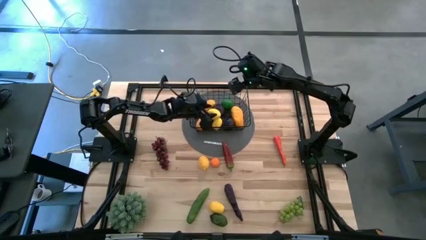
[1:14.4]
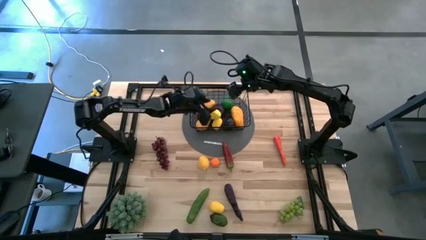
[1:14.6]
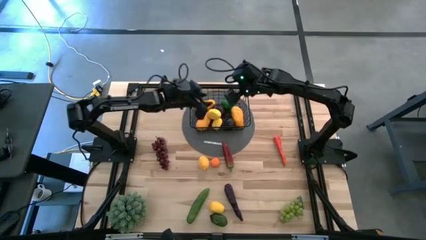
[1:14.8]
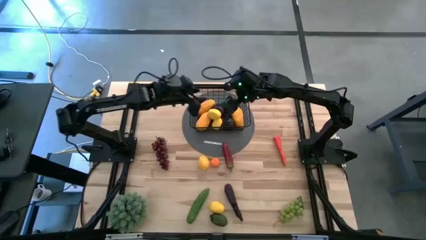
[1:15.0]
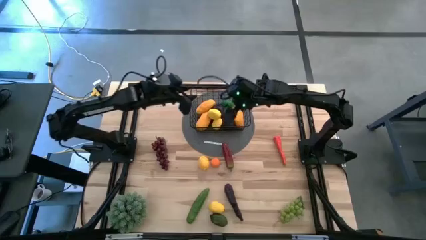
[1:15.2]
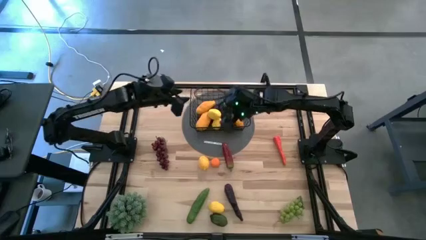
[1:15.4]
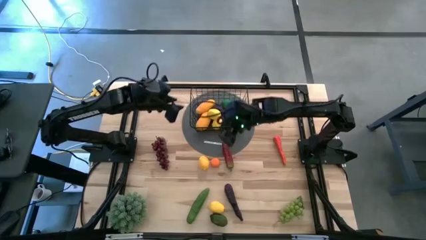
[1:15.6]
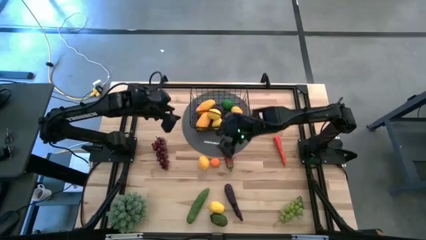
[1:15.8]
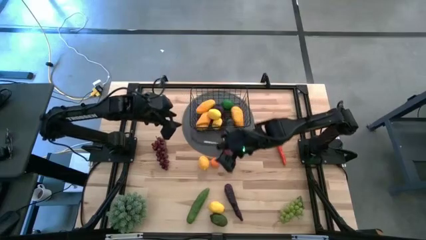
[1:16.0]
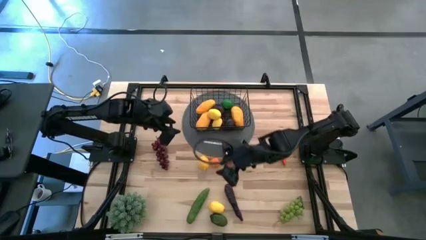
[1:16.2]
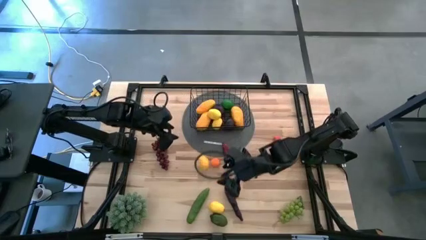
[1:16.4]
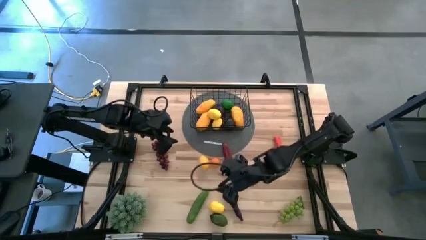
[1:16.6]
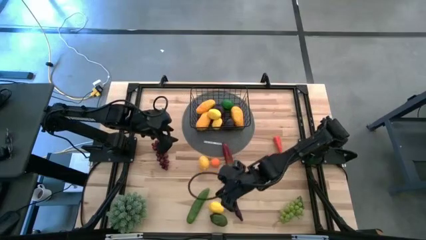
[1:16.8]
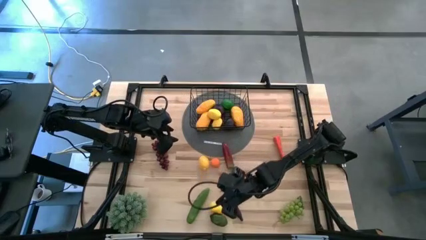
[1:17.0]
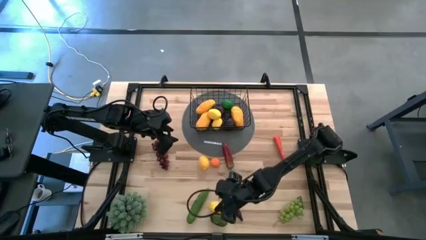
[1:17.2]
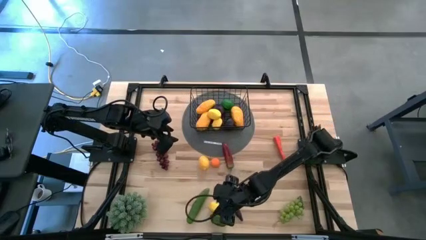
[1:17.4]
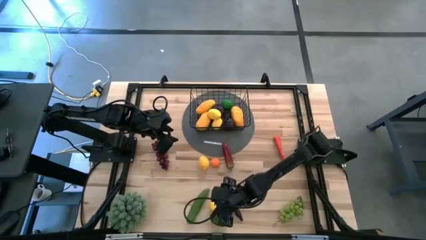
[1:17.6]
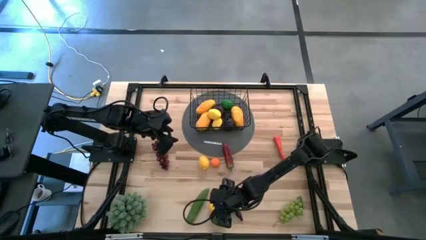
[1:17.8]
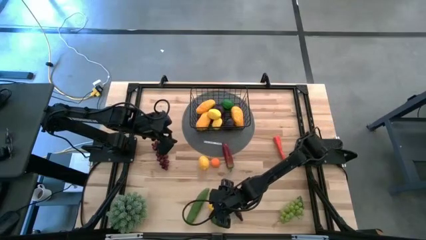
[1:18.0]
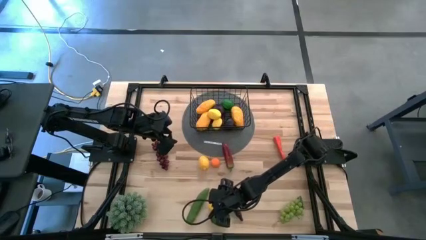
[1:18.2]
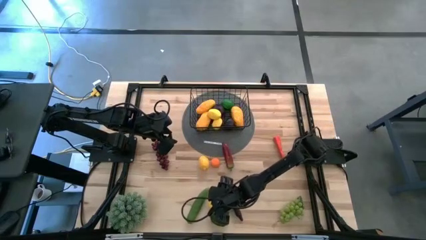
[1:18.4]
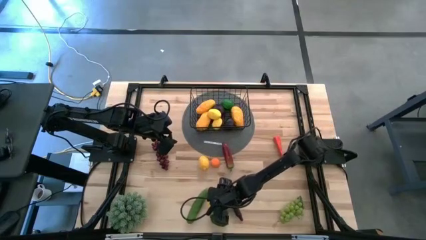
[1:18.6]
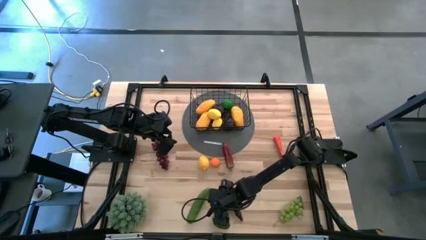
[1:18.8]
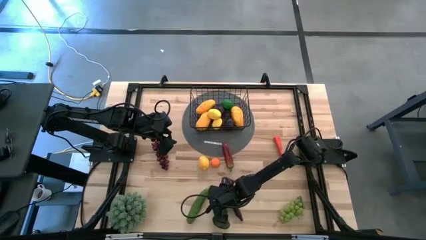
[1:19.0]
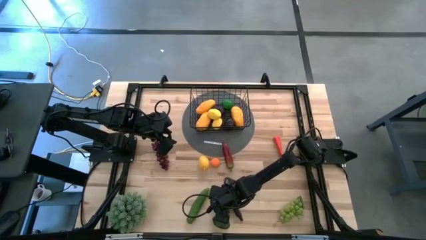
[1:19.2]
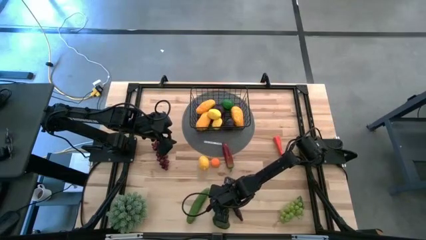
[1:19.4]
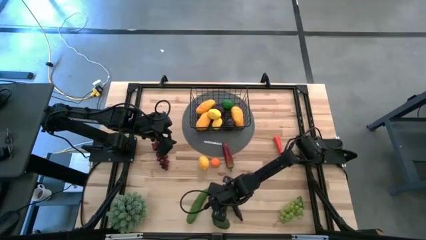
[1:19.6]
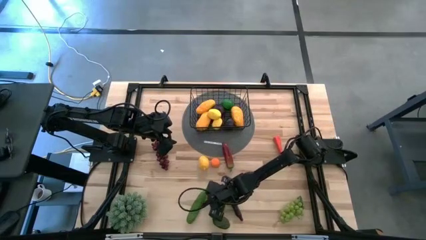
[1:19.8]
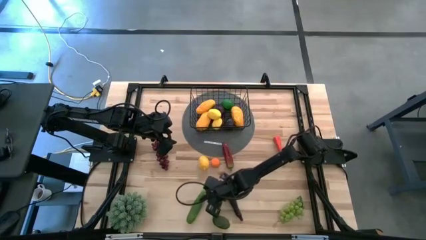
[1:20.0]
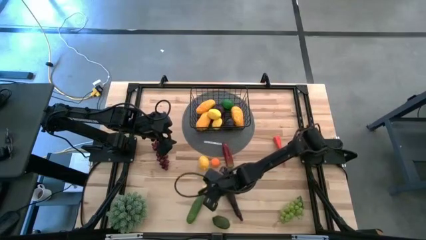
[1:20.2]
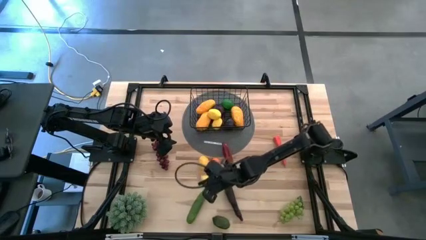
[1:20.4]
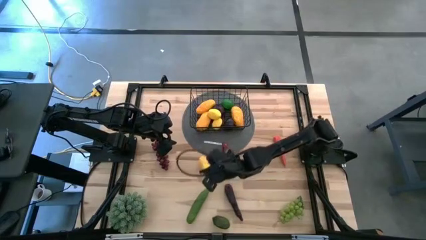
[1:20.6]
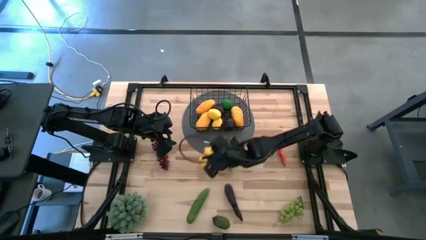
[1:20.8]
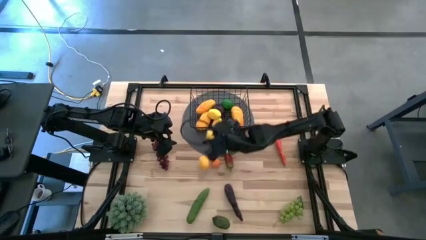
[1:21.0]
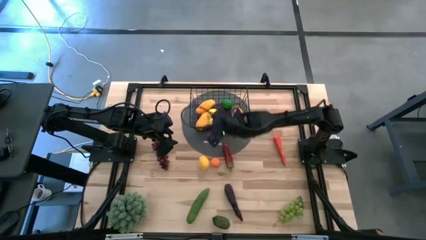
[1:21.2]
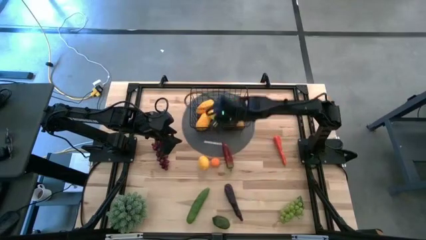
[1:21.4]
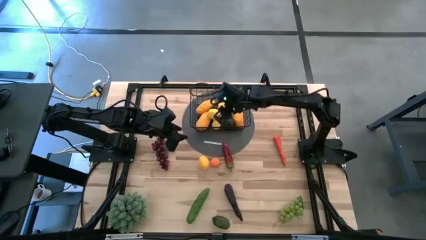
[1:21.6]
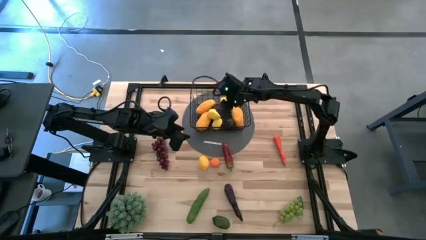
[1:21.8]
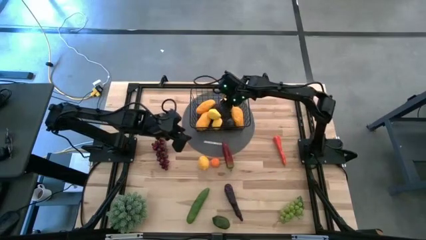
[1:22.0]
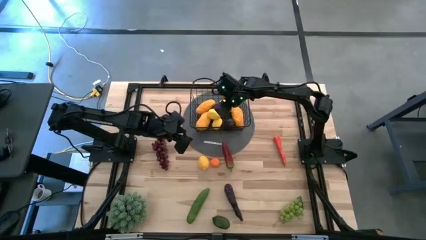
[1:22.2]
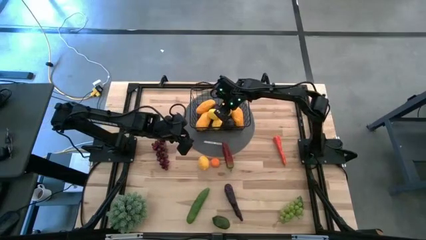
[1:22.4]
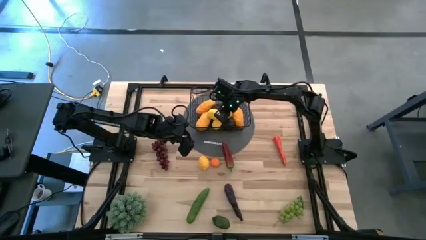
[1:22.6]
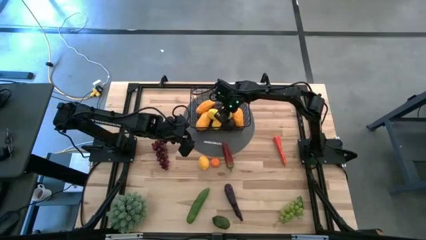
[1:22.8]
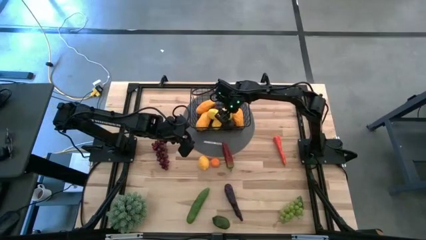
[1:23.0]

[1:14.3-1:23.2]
Task: Build produce basket
Put the yellow lemon into the black wire basket

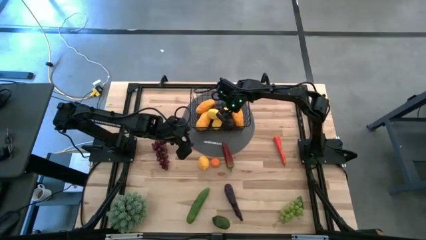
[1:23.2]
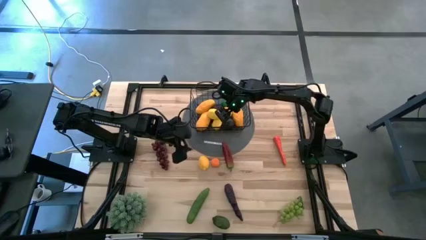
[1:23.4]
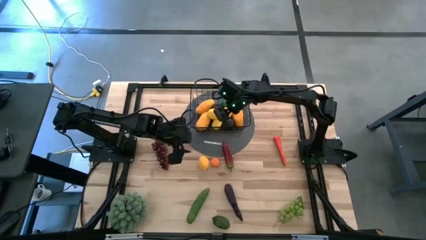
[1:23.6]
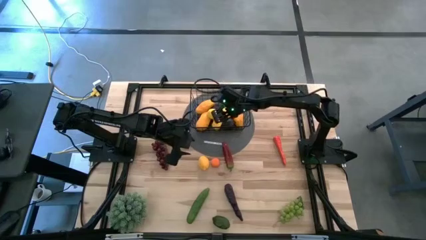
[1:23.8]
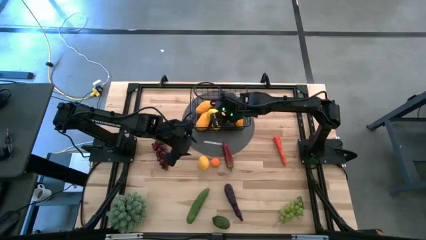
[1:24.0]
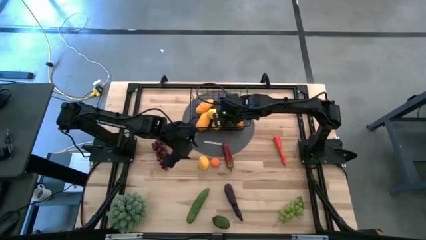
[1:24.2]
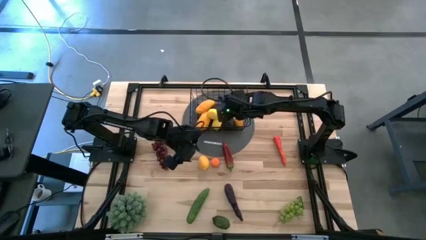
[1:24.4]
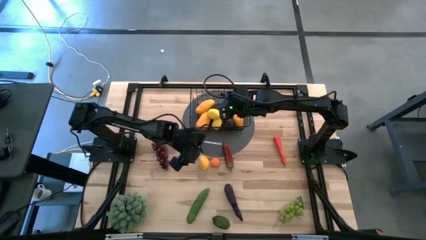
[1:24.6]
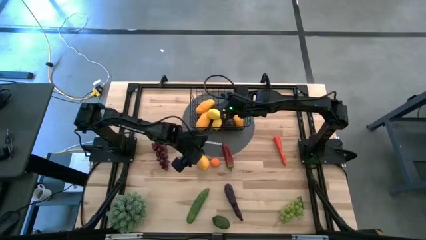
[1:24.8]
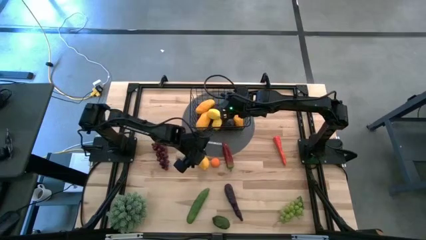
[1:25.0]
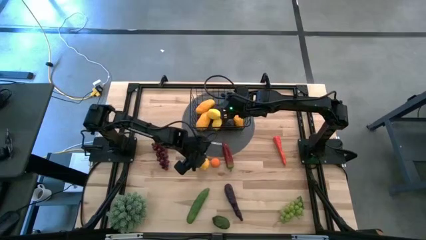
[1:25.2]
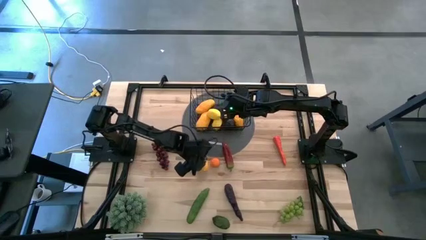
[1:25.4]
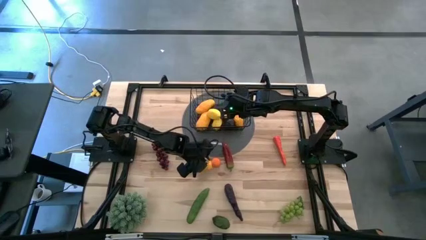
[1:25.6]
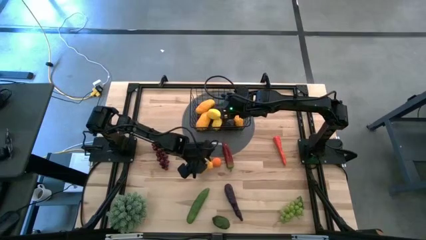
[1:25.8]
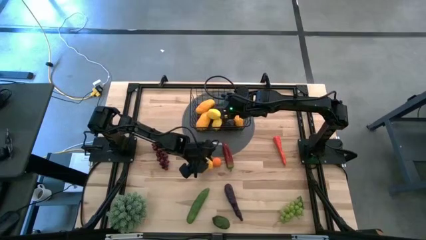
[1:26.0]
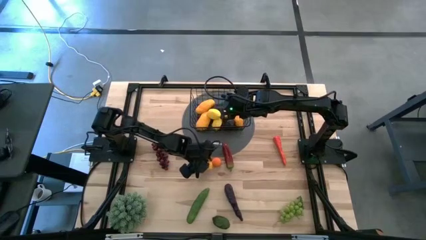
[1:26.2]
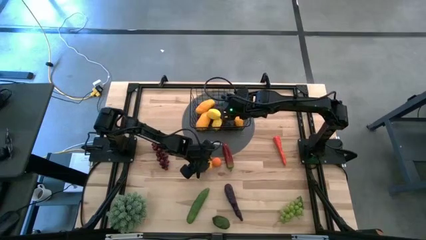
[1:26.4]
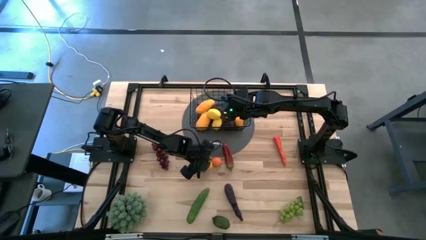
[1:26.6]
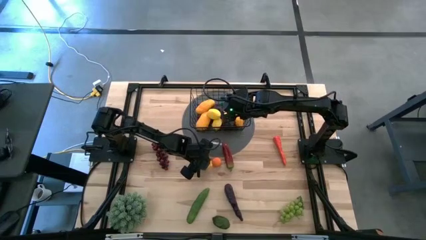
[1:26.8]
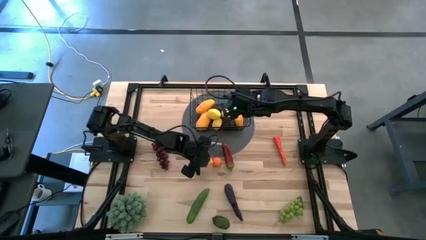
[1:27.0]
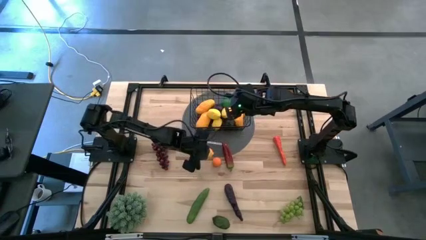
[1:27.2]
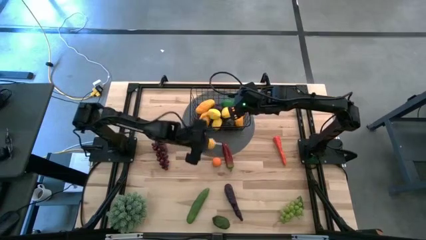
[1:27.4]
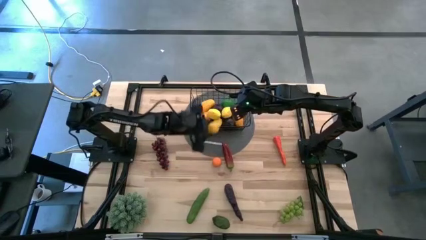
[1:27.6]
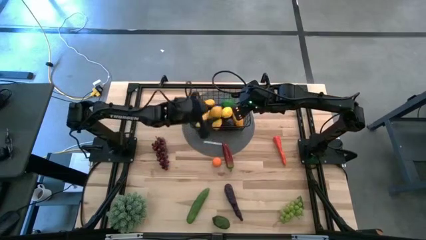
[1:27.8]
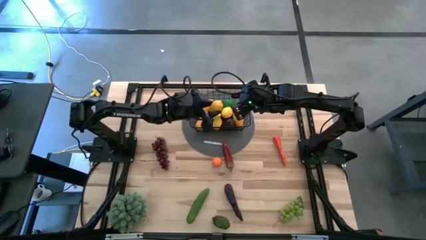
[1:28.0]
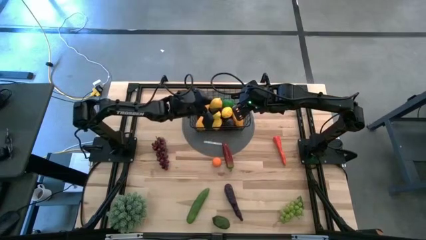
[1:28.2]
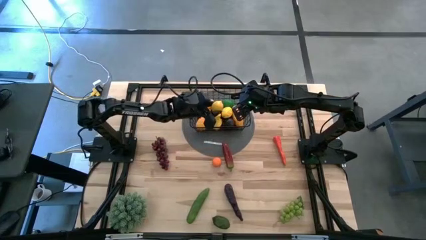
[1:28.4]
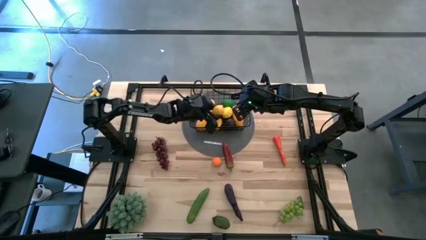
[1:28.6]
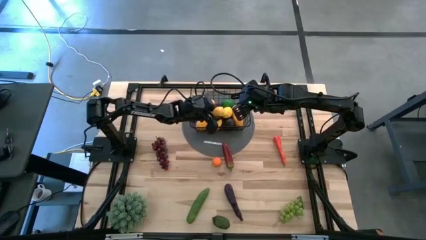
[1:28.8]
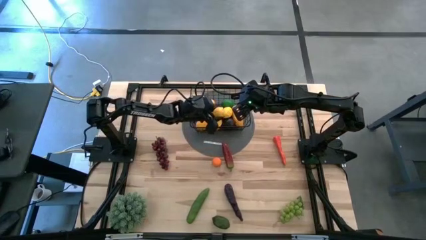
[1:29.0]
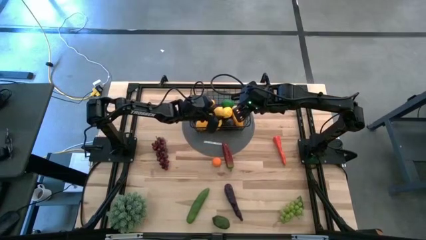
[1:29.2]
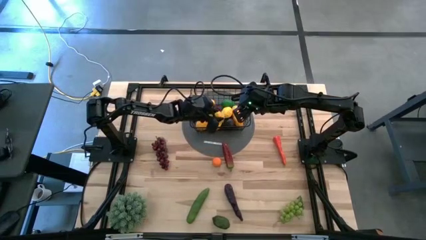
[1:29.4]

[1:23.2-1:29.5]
Put the yellow lemon into the black wire basket
